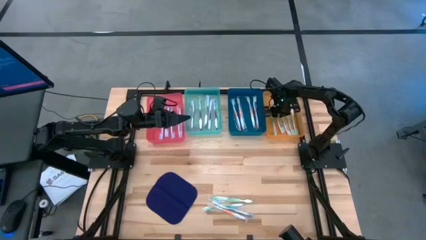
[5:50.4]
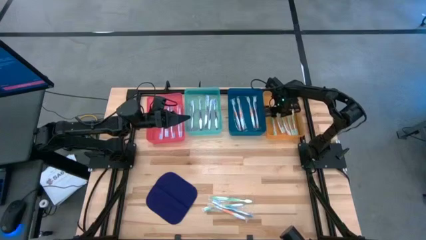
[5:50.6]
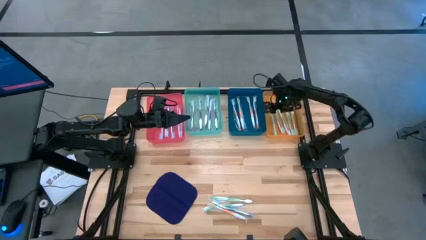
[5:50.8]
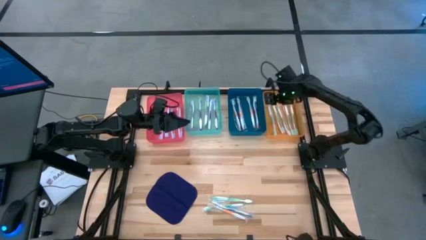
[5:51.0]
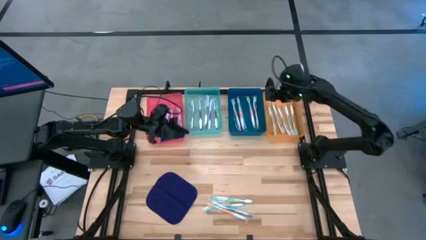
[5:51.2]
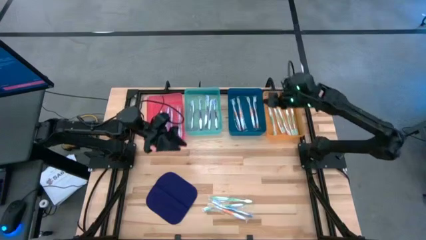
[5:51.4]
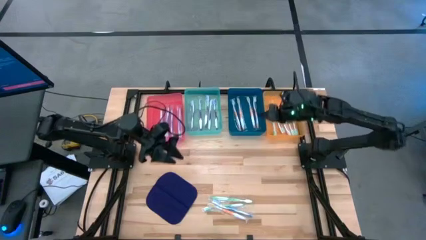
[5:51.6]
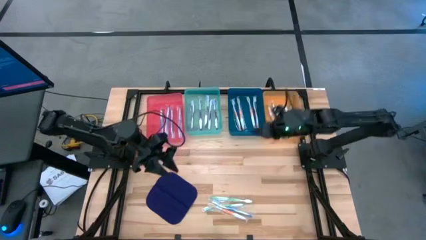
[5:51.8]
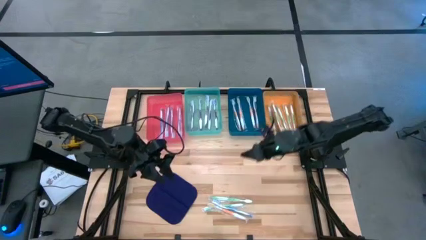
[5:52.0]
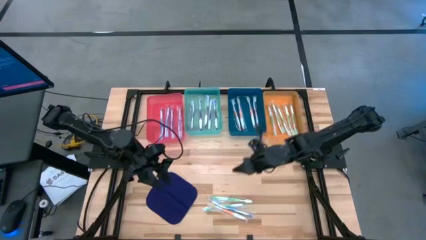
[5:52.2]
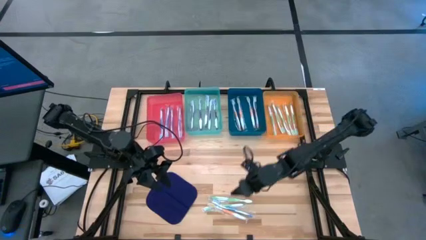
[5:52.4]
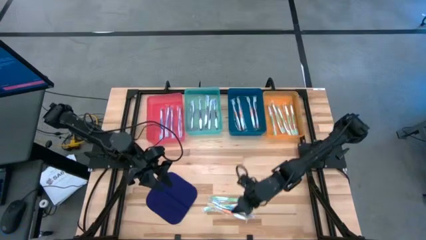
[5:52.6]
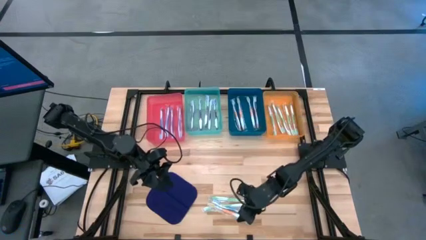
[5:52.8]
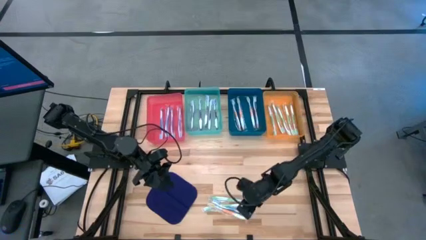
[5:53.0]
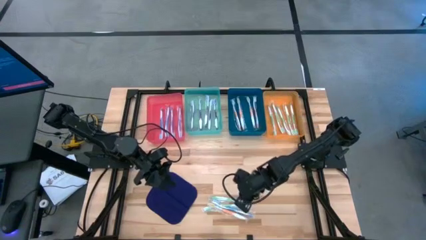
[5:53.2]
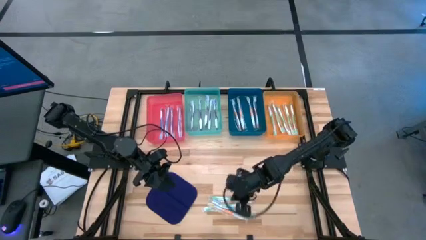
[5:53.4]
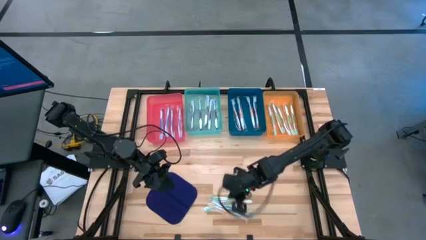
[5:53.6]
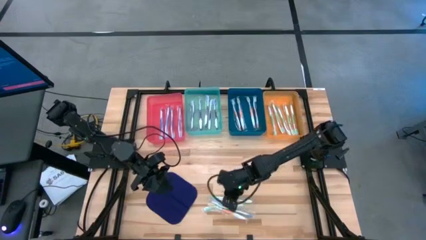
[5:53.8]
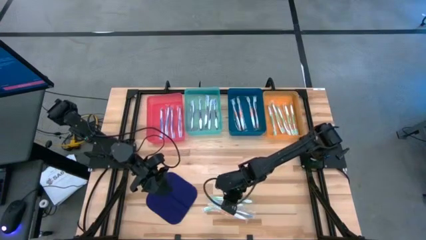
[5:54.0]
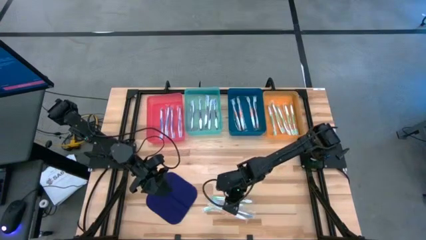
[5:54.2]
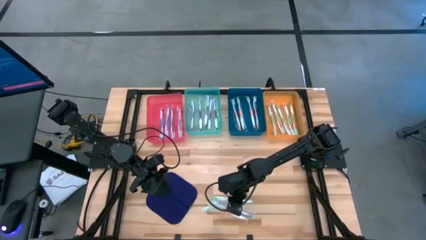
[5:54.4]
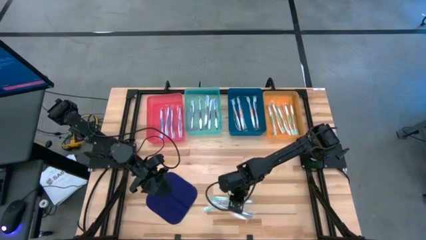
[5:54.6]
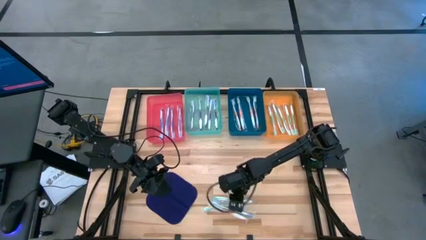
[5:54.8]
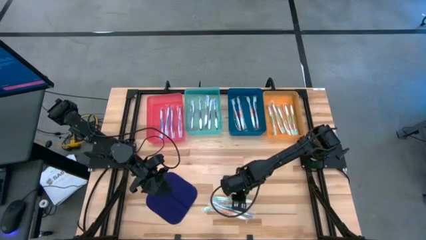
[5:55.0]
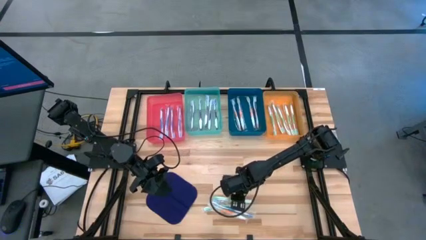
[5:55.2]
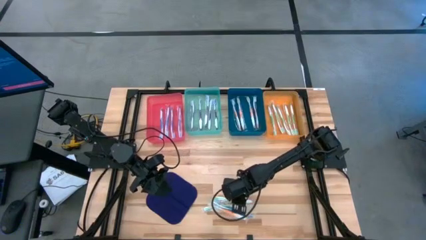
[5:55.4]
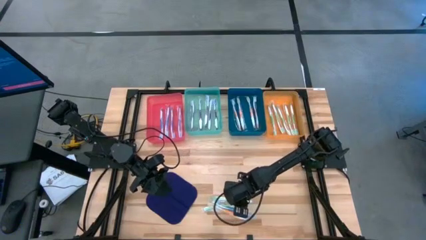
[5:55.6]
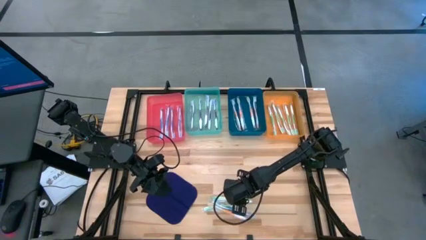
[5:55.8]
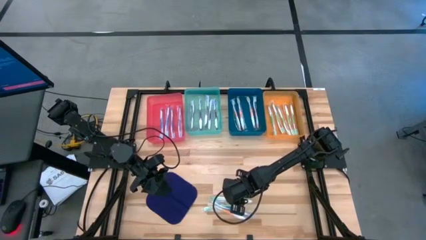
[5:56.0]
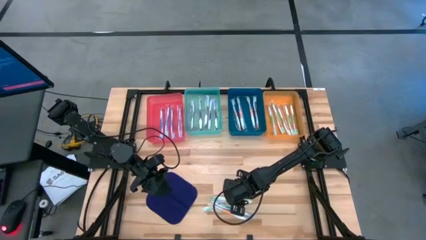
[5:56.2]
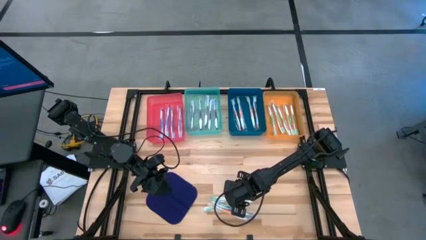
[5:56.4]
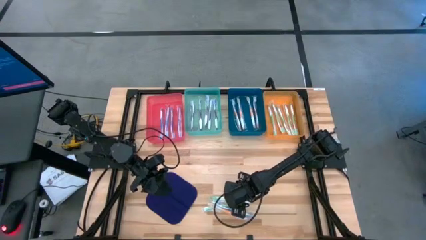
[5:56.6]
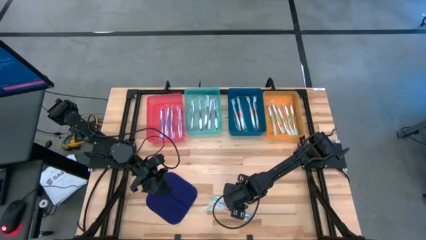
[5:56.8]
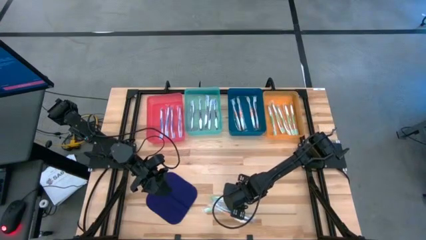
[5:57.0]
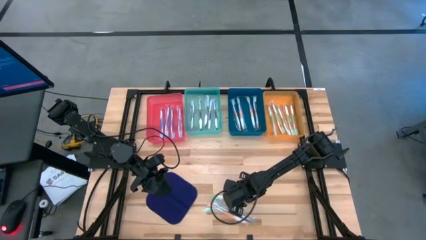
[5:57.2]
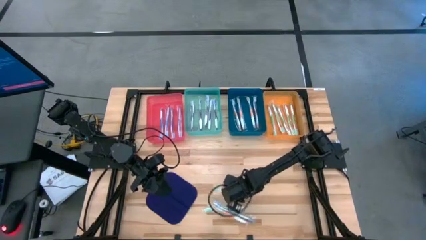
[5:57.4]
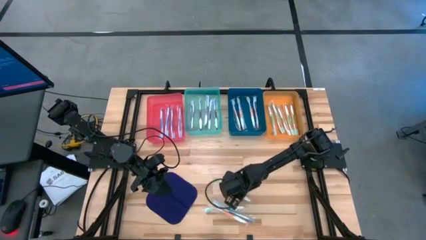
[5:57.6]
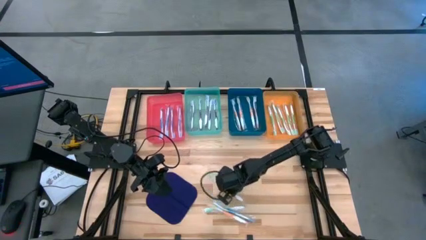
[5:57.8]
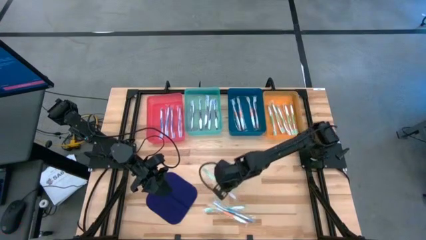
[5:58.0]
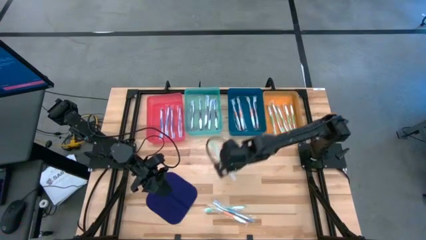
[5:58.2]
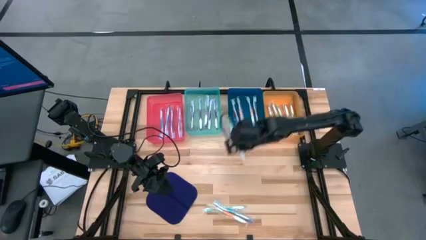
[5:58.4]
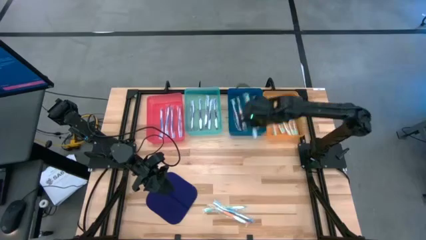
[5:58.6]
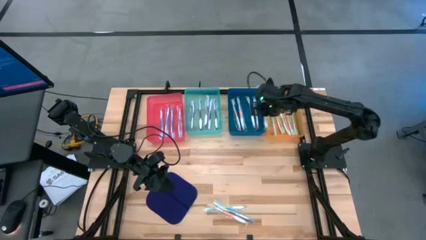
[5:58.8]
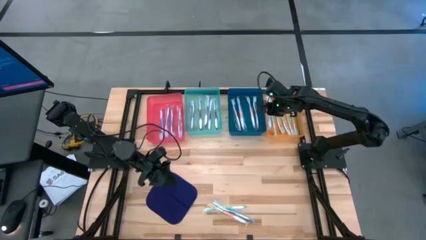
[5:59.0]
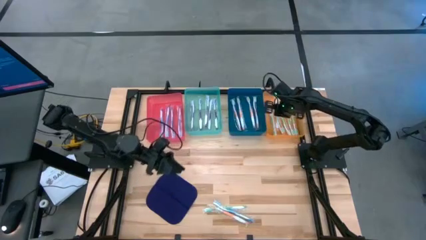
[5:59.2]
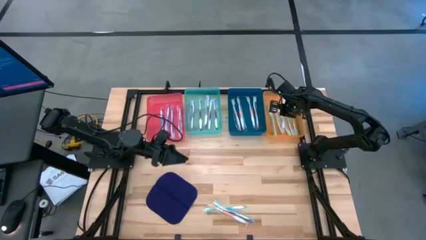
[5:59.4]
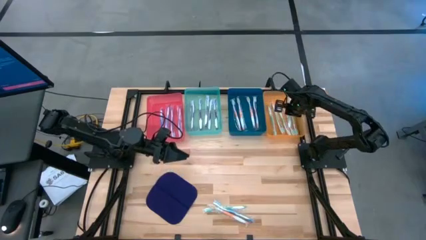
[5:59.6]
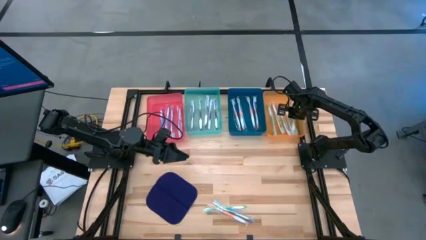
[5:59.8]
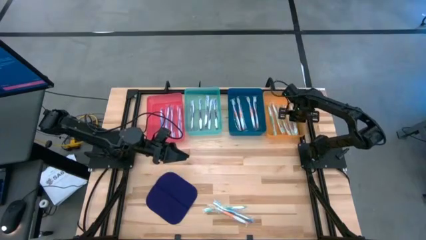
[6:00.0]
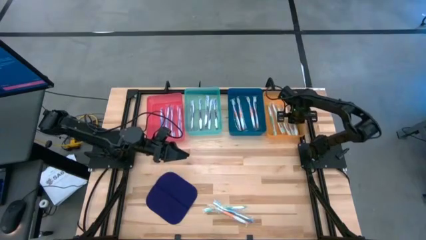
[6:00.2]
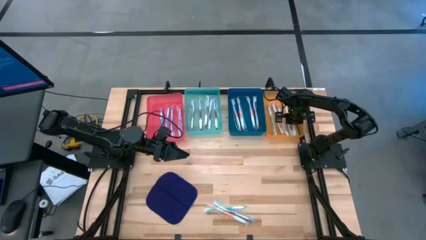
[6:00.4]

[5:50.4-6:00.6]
Task: Pick & Place Toothbrushes
Put the green toothbrush into the orange bin

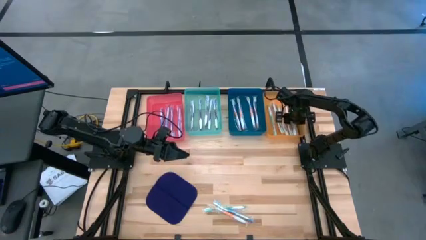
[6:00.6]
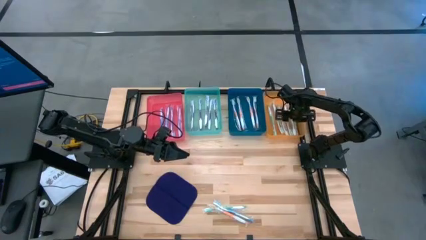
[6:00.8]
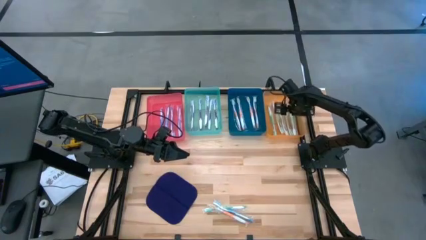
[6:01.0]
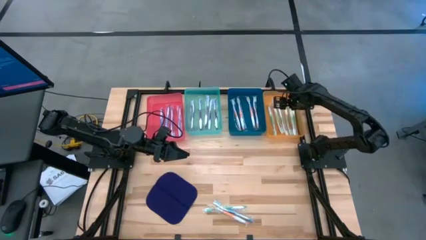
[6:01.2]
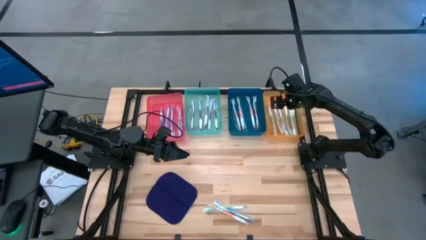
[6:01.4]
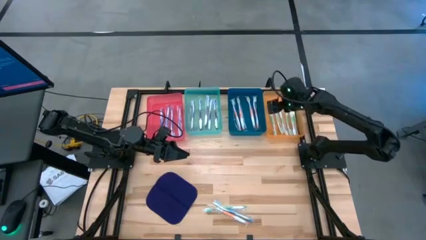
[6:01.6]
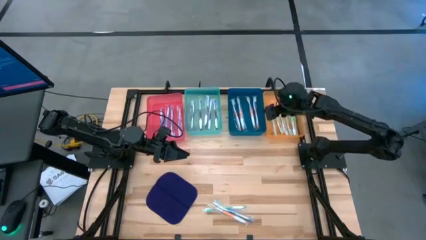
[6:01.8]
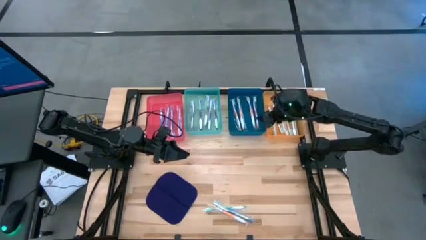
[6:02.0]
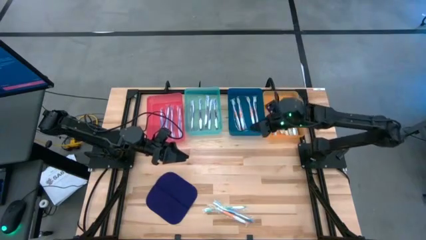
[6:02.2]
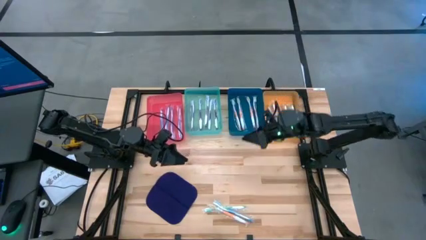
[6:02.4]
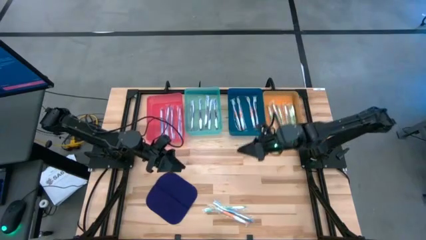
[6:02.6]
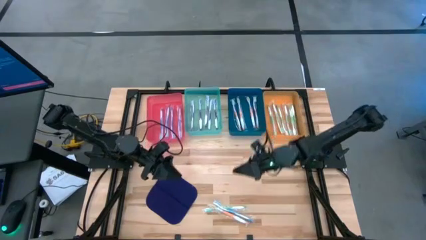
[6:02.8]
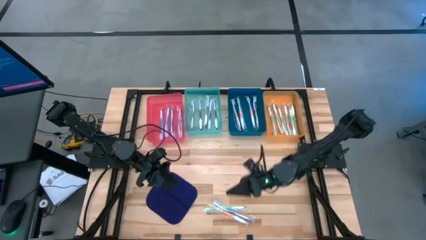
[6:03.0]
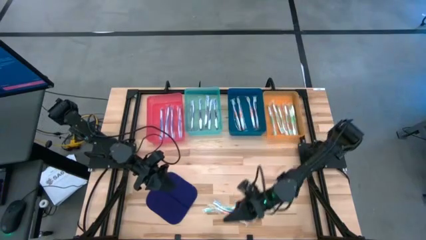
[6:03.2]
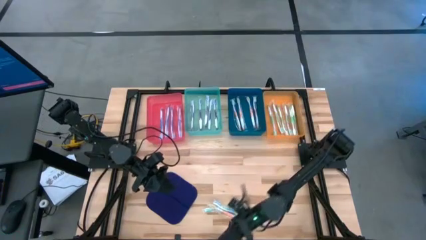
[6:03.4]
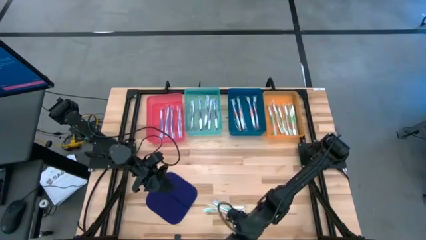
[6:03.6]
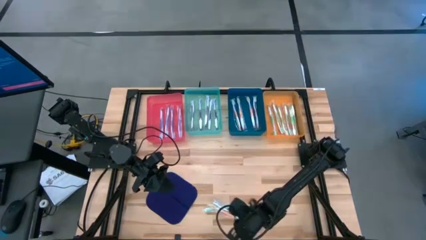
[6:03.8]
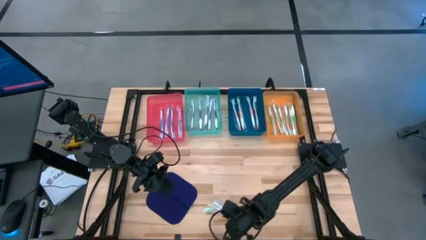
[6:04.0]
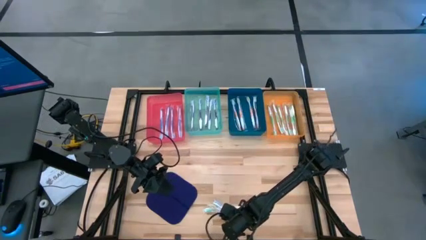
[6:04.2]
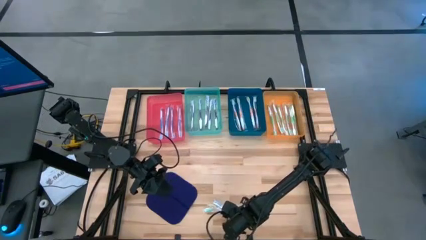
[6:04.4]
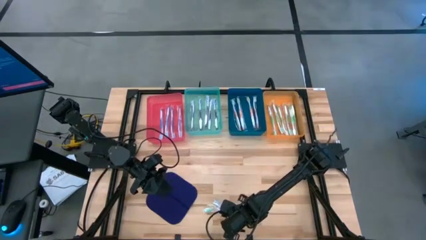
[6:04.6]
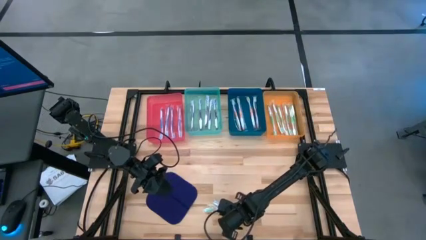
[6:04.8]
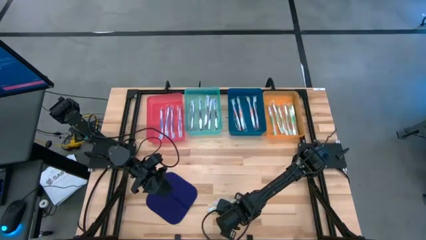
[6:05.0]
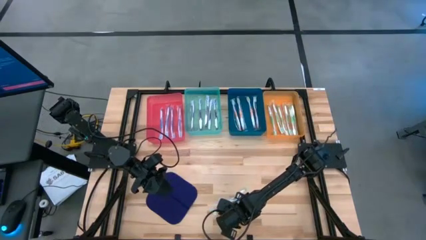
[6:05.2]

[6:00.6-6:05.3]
Put the orange toothbrush into the blue bin
